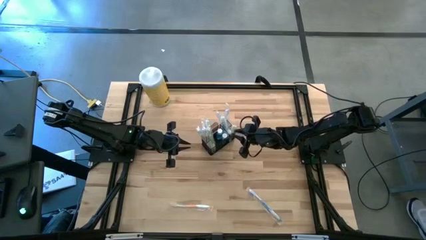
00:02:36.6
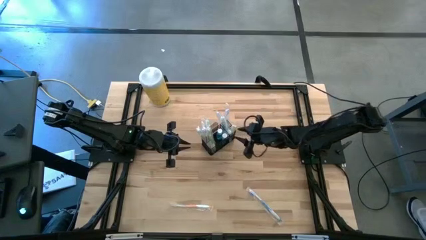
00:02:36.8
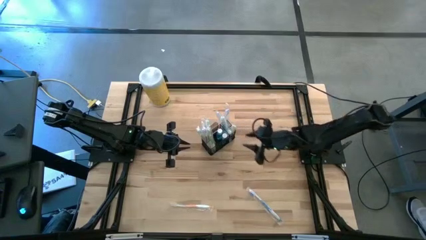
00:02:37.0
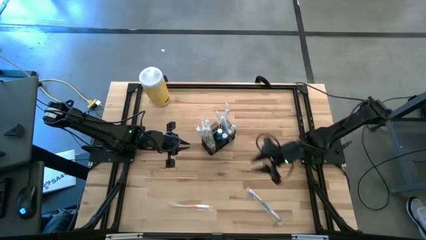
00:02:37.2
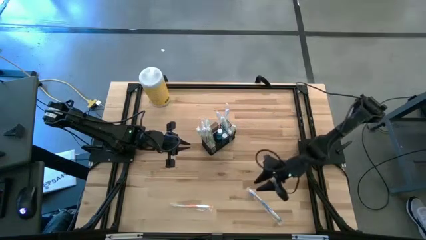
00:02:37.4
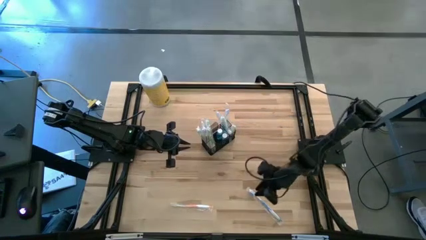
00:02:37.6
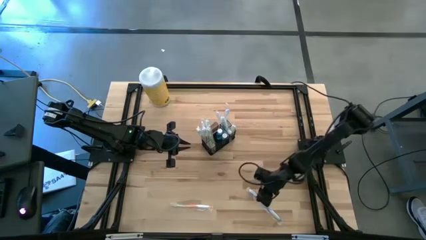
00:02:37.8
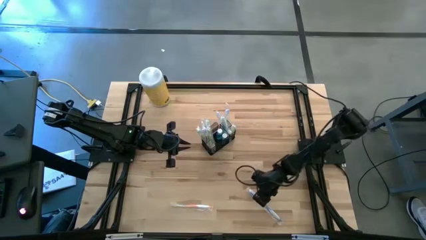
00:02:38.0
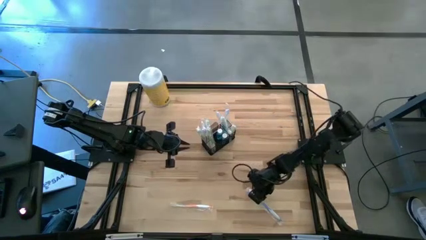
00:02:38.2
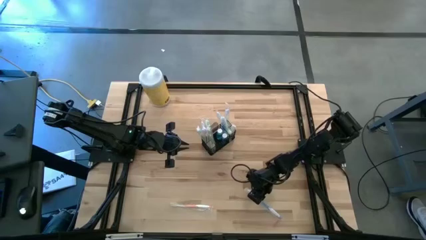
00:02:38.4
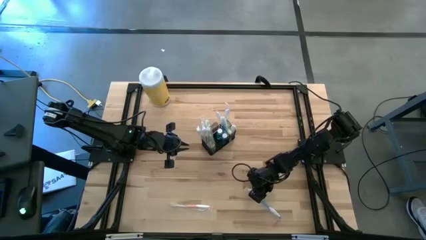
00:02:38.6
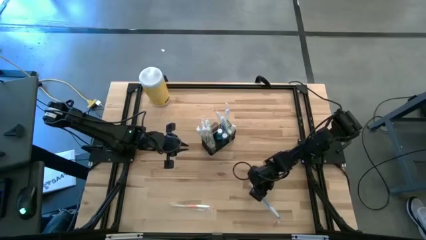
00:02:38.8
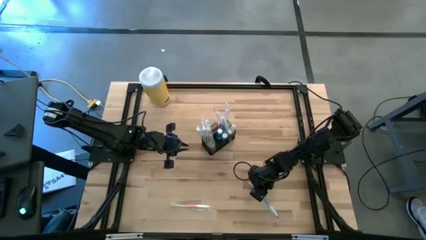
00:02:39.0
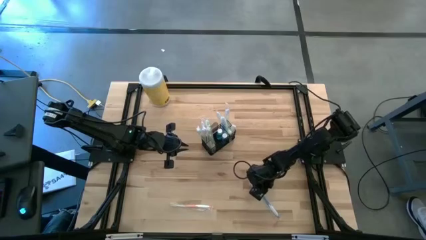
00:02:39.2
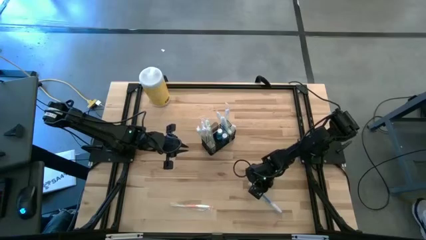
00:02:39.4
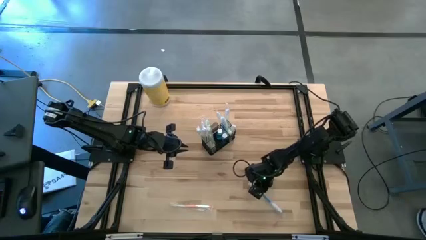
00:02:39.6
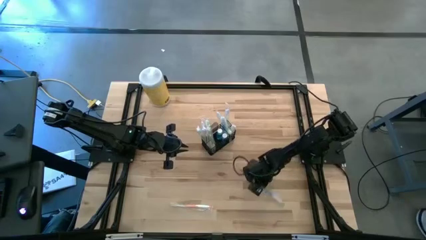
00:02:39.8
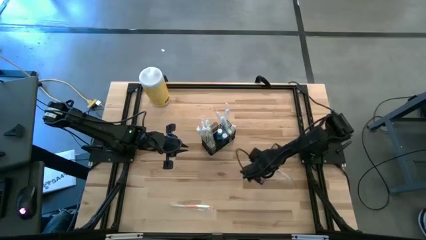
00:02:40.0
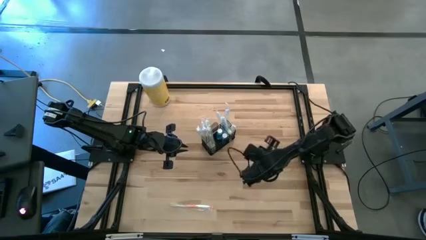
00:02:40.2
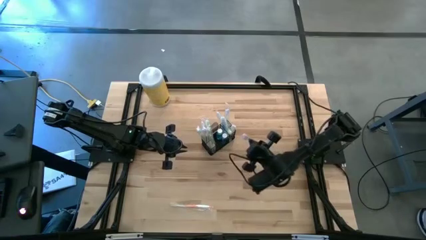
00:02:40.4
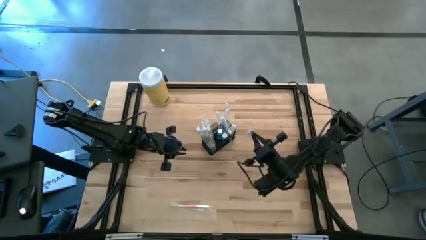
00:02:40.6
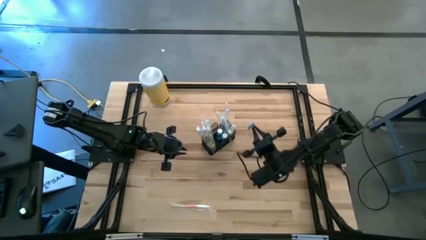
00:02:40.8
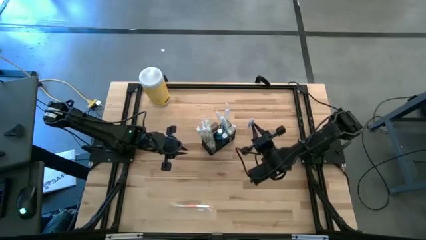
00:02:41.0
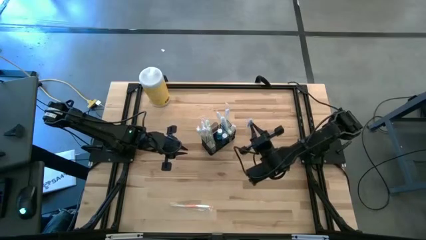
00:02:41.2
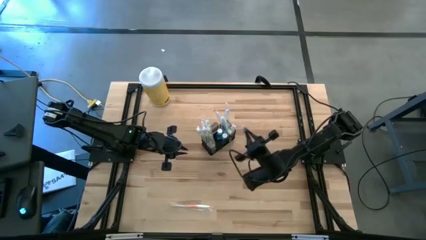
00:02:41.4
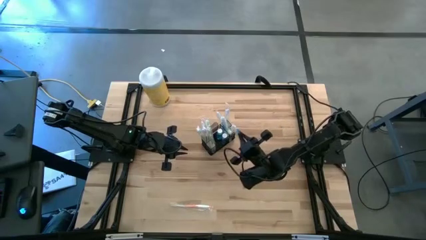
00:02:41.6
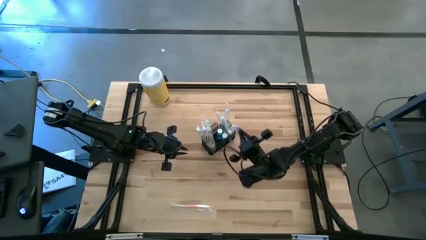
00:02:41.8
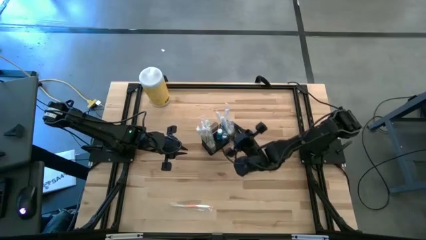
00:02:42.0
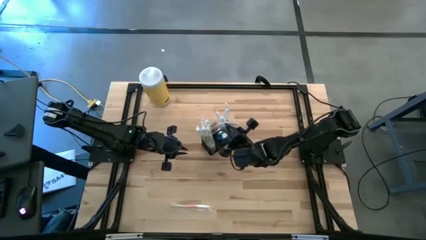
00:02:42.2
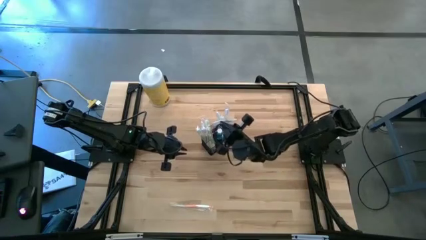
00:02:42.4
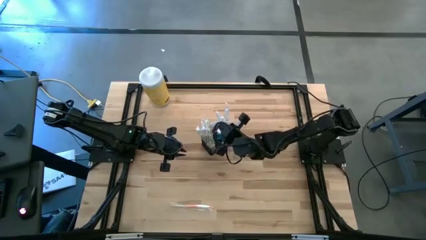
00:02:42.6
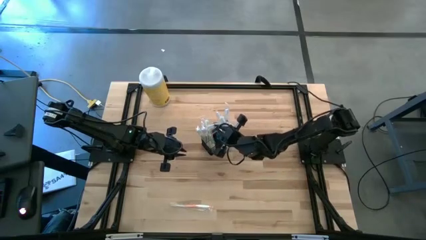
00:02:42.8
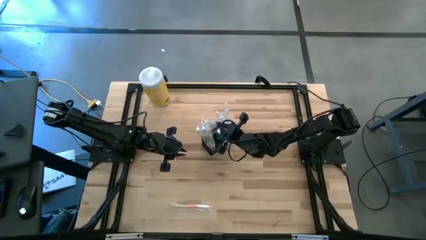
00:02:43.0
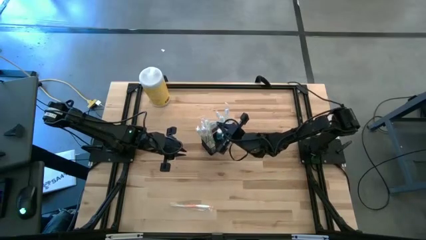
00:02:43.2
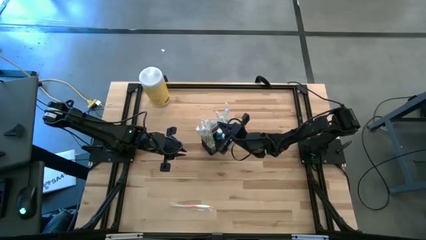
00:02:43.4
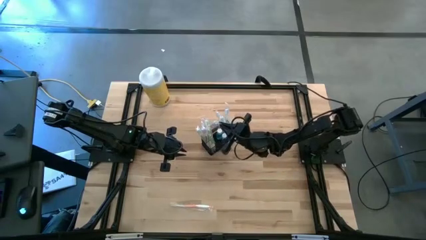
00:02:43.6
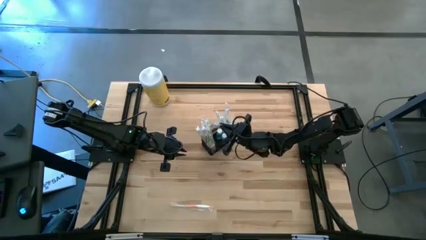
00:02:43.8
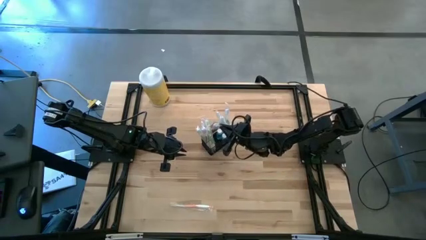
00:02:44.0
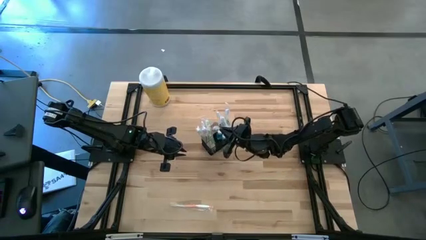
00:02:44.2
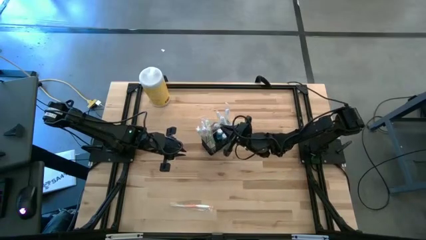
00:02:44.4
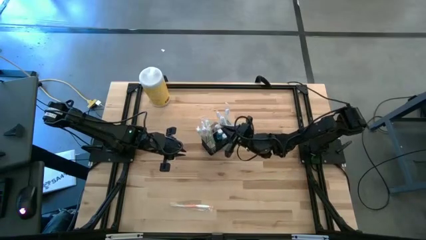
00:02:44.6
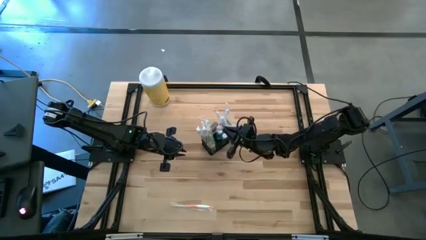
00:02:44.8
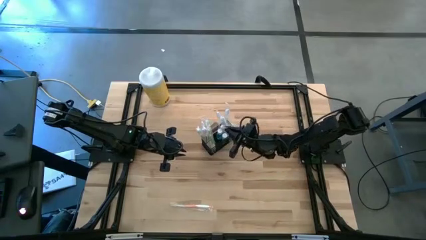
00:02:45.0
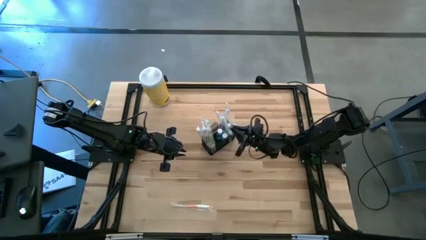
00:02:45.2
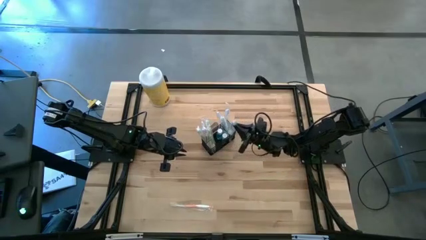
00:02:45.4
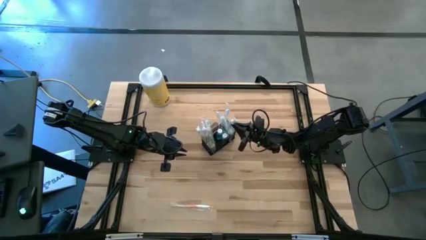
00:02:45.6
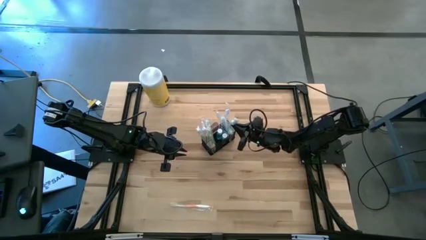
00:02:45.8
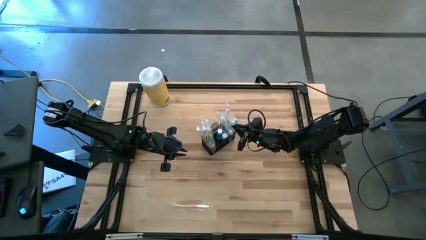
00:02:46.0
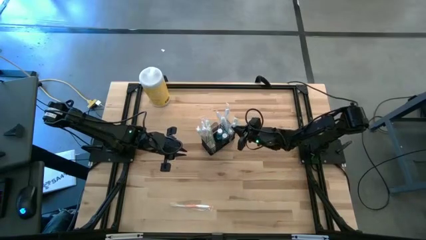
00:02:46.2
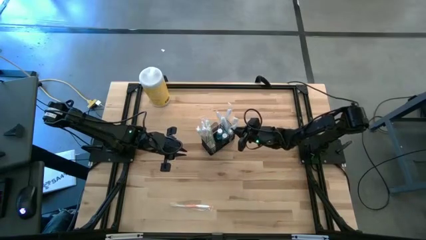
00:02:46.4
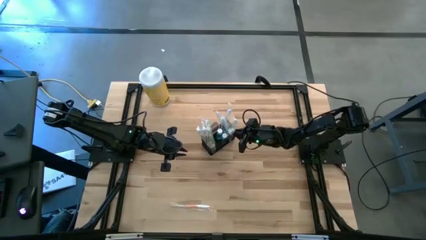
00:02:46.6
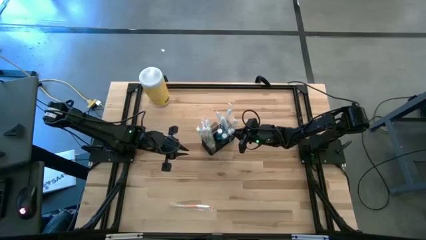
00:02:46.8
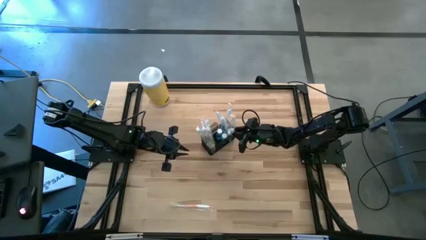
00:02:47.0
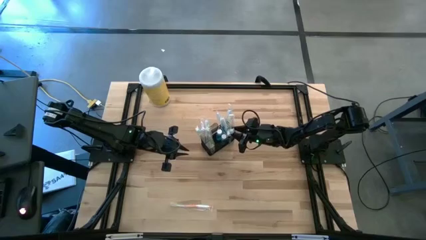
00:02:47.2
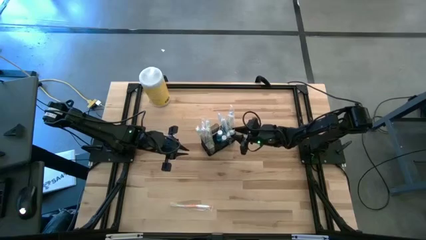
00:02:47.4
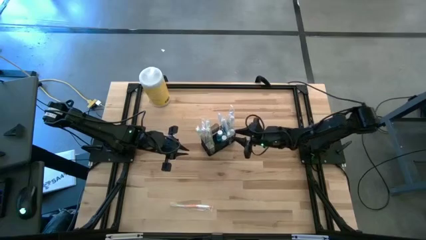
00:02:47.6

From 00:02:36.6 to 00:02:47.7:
Task: Pick & Place toothbrushing station
Put the blue toothbrush into the wire organizer

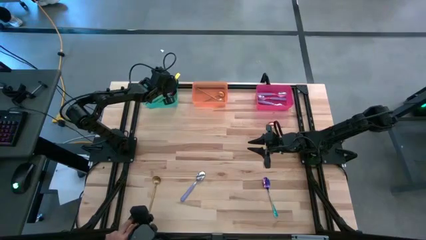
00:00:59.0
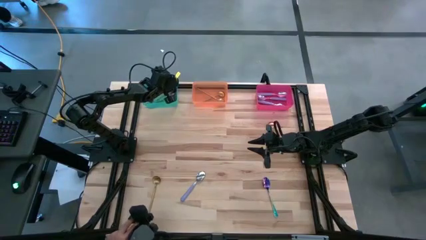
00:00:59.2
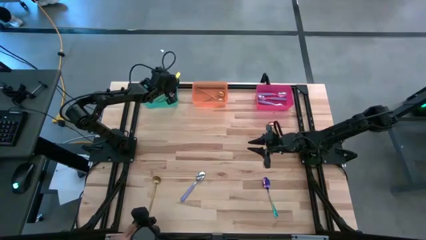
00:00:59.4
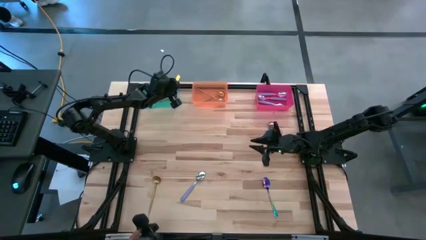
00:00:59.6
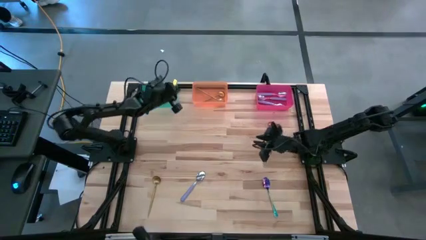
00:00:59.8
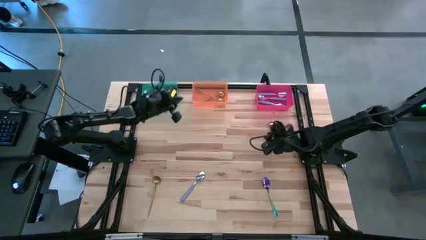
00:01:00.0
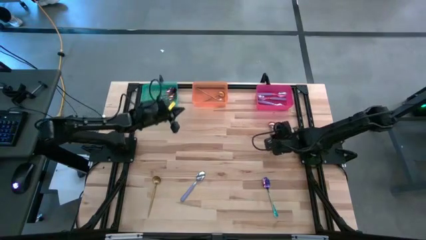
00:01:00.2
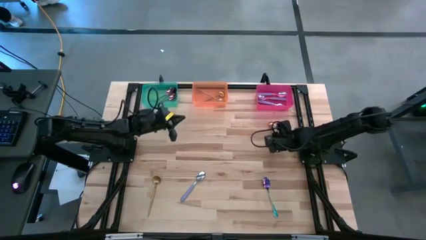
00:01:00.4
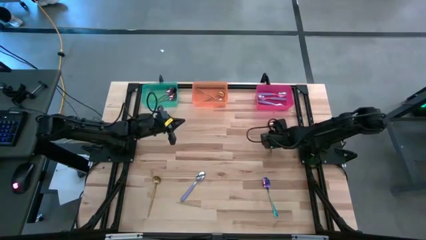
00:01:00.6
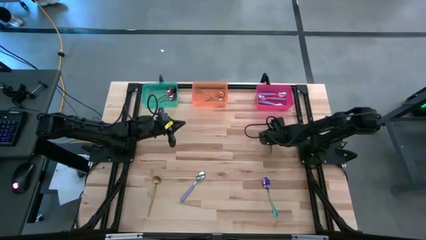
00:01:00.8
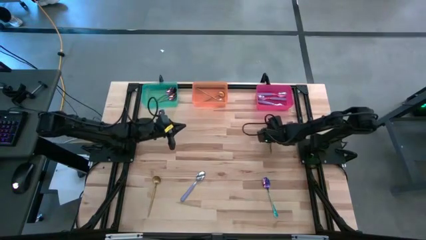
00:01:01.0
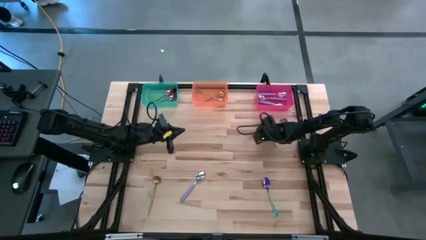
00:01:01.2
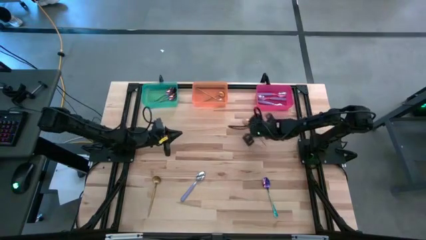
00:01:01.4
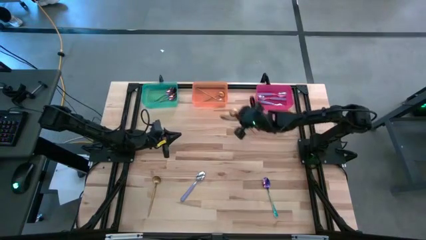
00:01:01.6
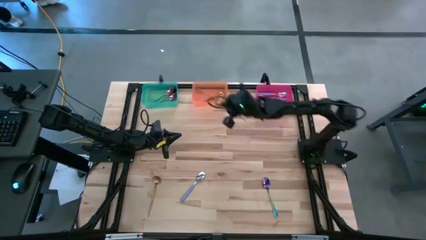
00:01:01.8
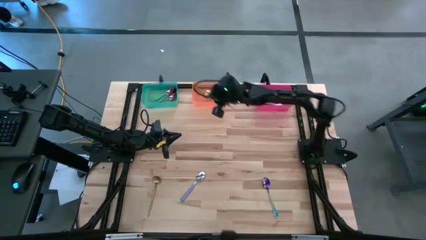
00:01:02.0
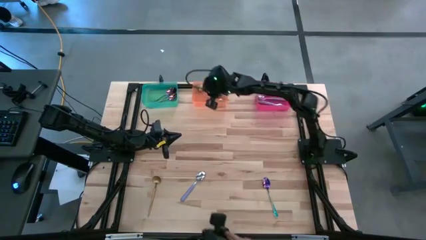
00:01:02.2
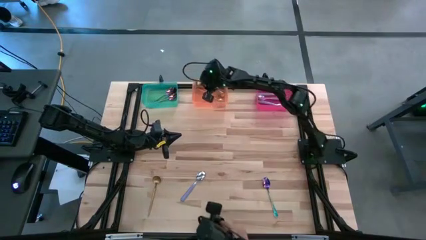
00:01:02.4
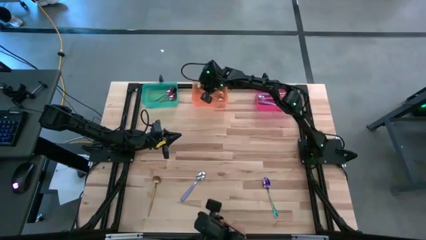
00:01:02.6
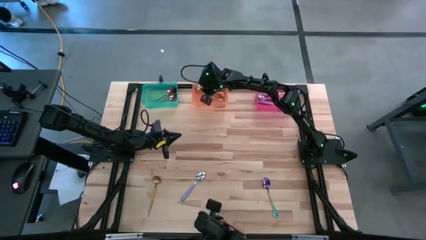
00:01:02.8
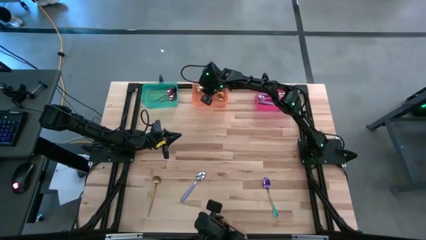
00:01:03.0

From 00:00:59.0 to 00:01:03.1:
Task: Sort silverware by color (type)
Put the gold spoon into the orange bin

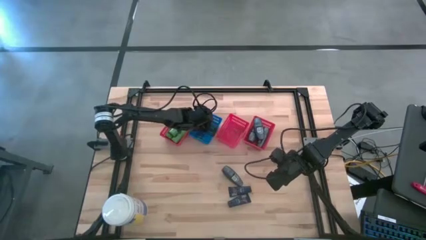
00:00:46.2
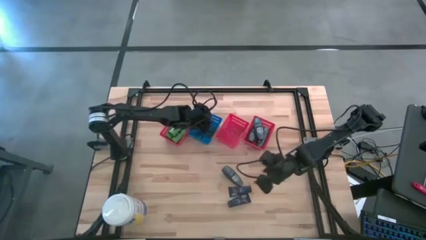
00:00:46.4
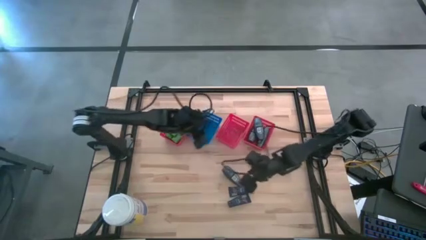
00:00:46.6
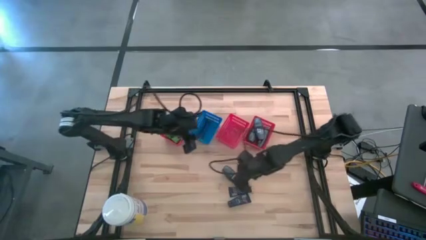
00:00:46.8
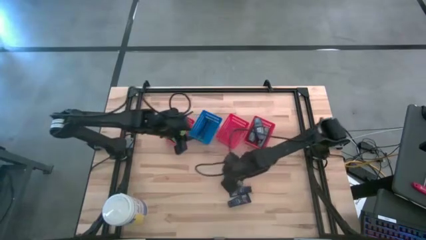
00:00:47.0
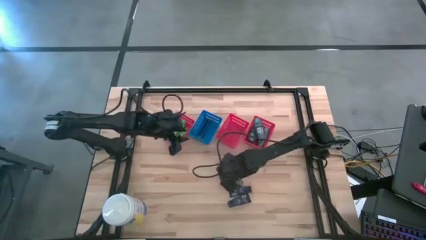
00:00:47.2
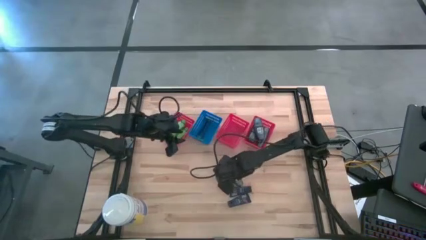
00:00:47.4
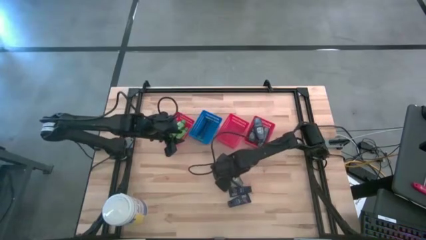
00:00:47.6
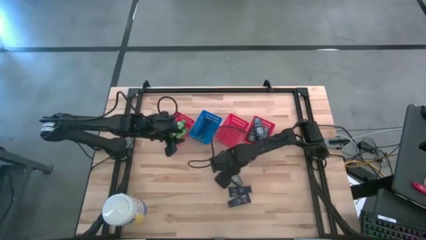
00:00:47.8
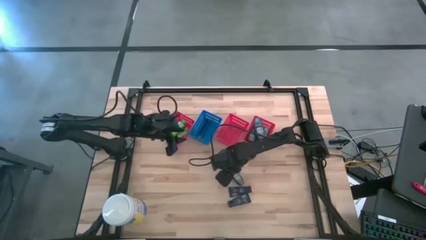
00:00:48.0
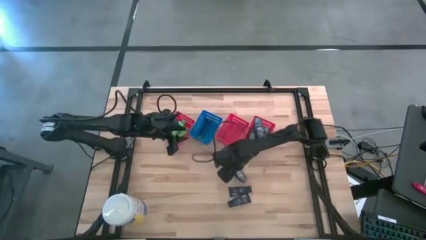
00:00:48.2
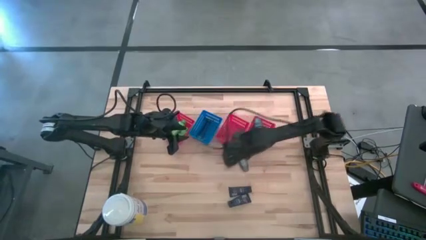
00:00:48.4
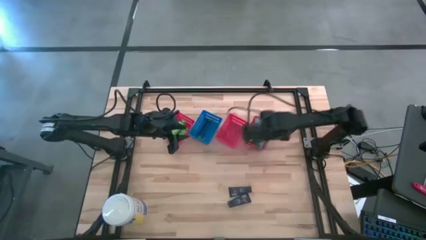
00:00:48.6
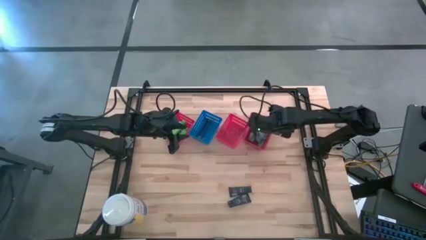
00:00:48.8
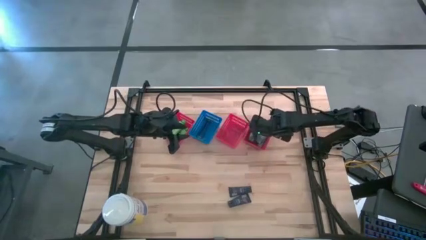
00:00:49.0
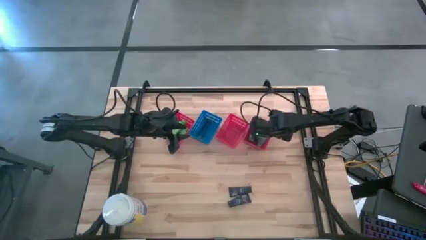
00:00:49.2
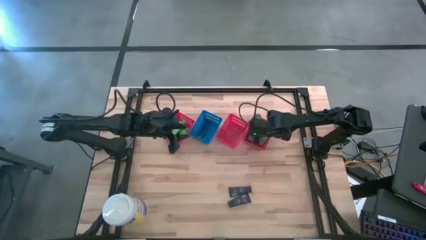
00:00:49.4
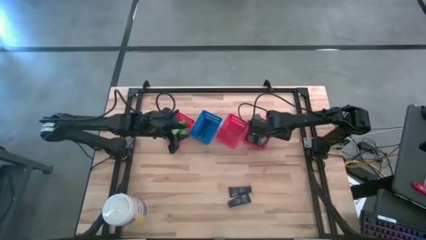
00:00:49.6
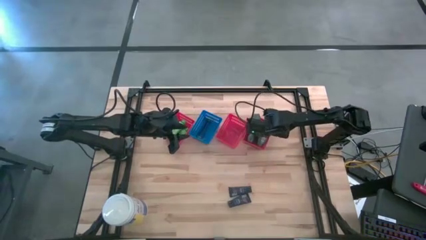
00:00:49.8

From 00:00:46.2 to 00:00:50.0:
Task: Pick & Place Travel size toiletries
Put the black deodorant into the right red bin
